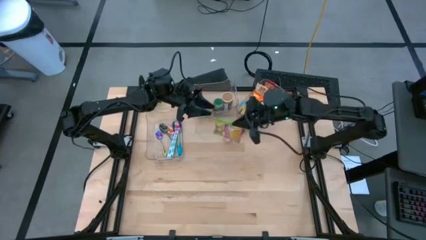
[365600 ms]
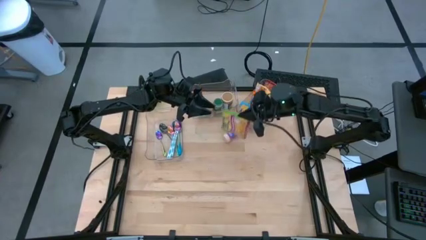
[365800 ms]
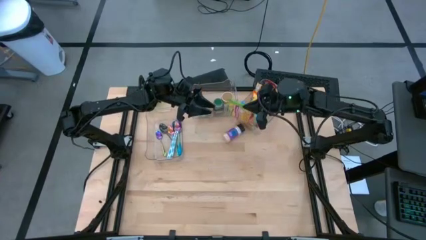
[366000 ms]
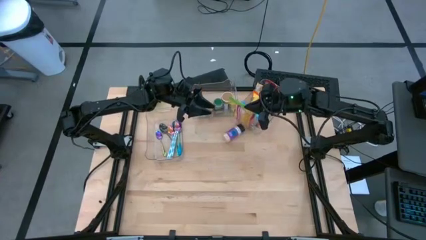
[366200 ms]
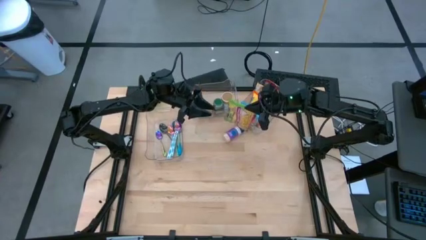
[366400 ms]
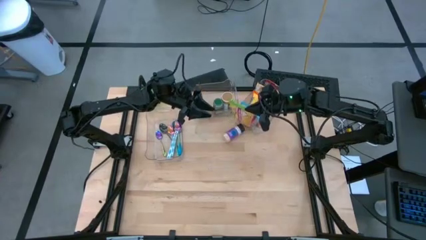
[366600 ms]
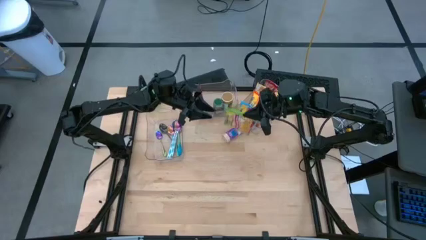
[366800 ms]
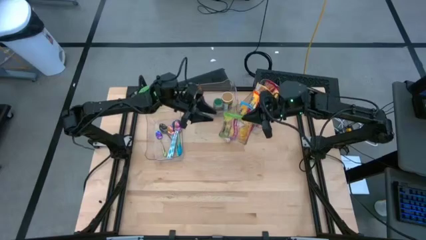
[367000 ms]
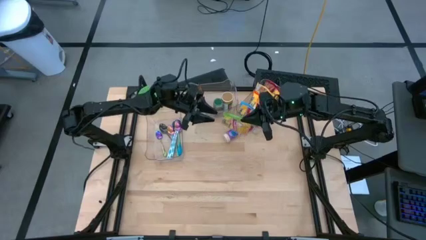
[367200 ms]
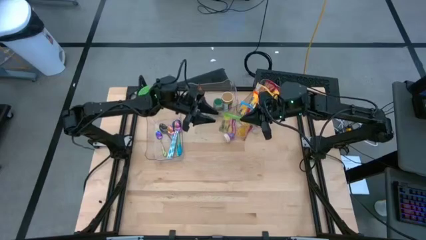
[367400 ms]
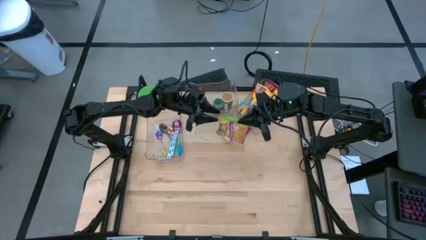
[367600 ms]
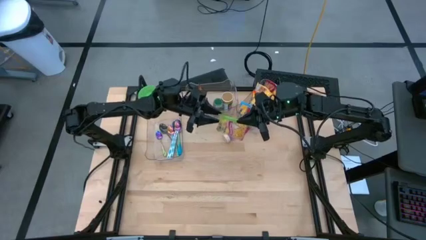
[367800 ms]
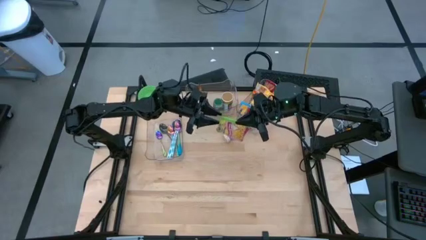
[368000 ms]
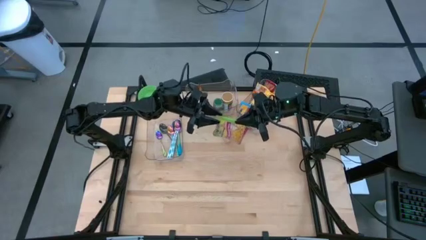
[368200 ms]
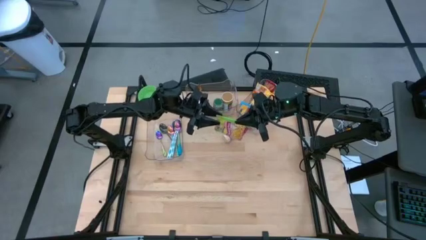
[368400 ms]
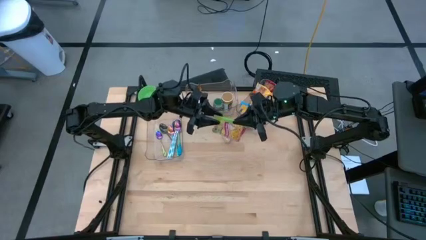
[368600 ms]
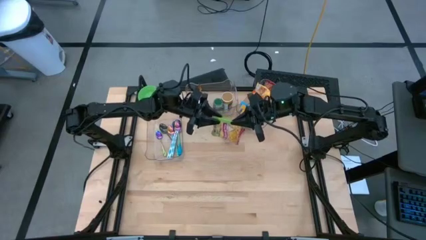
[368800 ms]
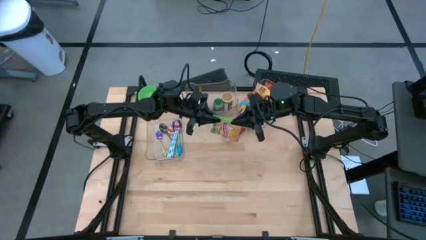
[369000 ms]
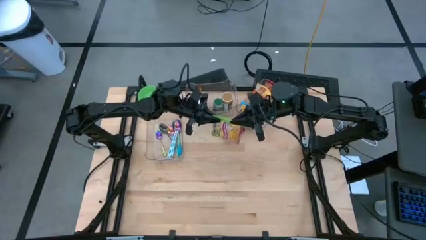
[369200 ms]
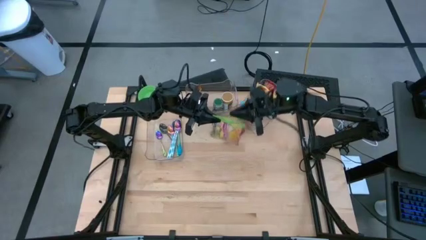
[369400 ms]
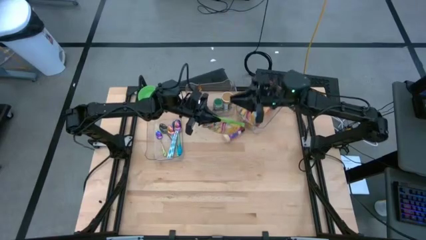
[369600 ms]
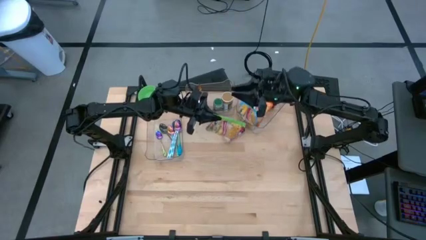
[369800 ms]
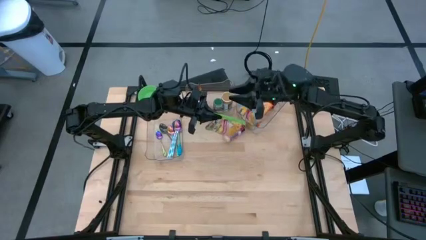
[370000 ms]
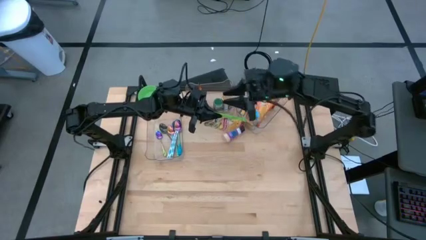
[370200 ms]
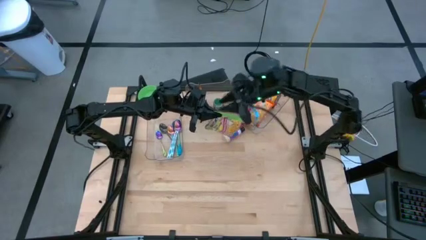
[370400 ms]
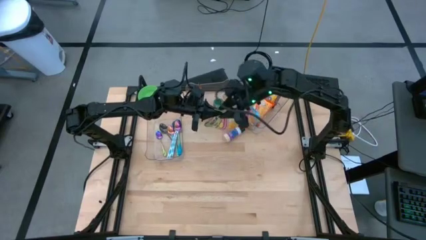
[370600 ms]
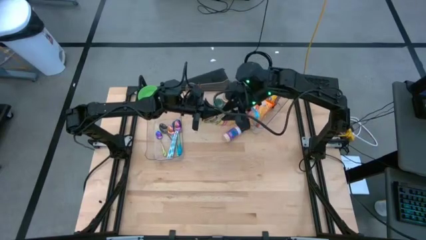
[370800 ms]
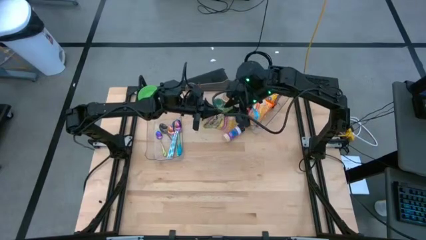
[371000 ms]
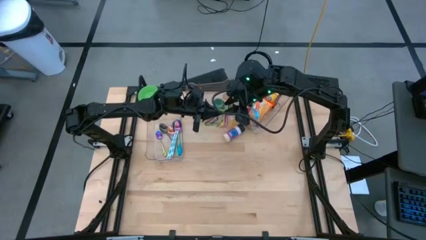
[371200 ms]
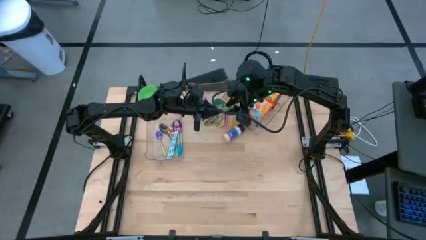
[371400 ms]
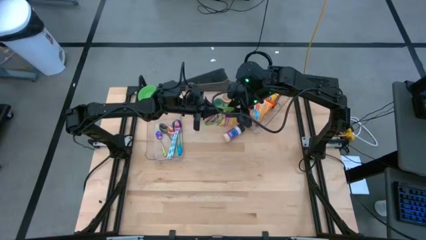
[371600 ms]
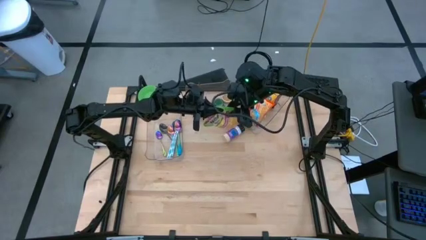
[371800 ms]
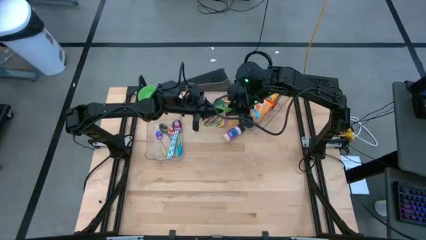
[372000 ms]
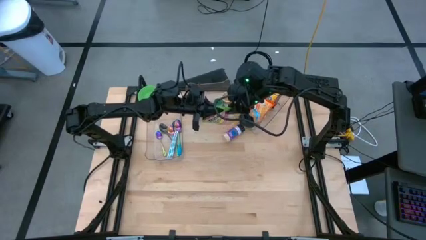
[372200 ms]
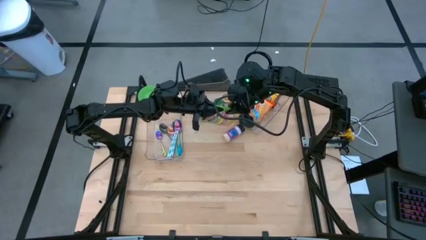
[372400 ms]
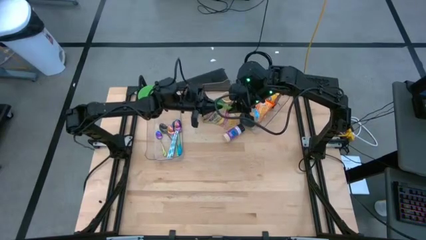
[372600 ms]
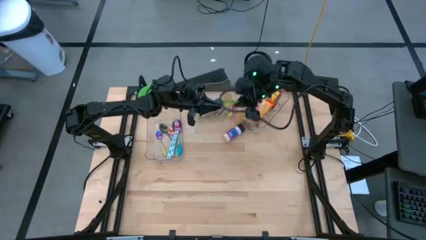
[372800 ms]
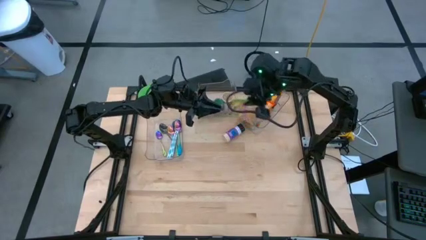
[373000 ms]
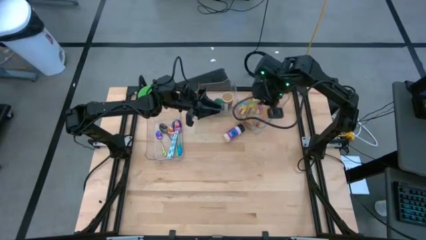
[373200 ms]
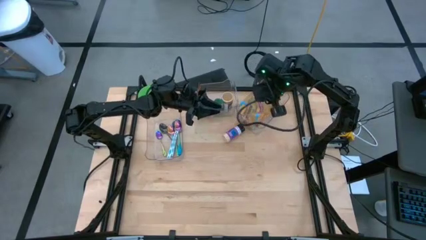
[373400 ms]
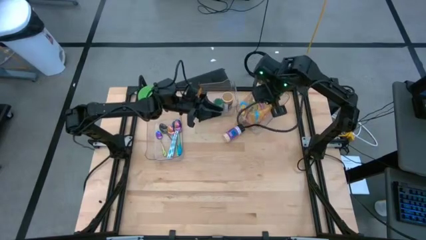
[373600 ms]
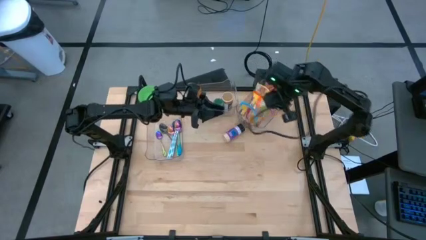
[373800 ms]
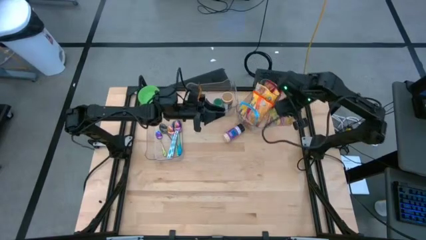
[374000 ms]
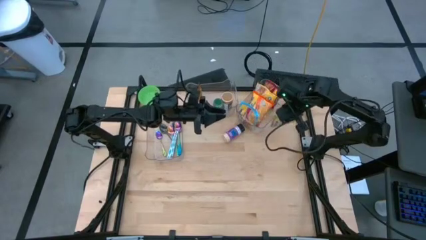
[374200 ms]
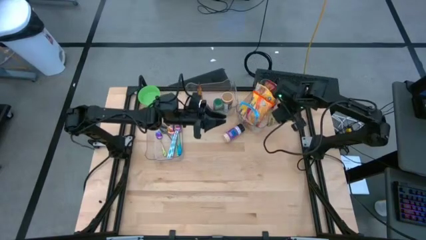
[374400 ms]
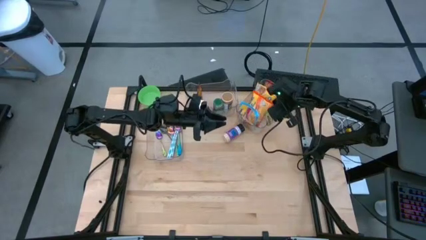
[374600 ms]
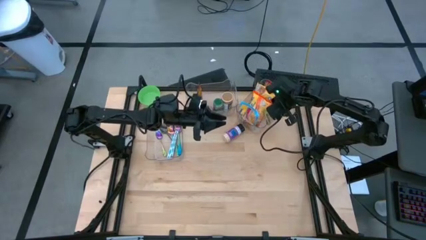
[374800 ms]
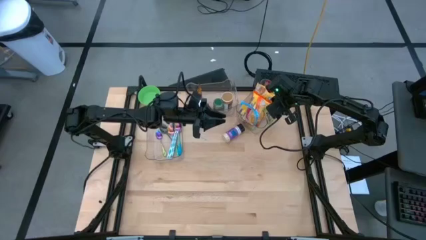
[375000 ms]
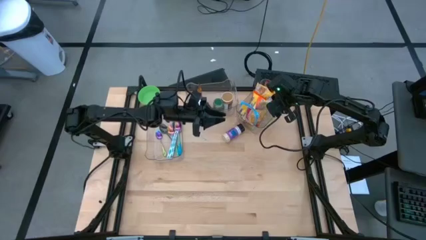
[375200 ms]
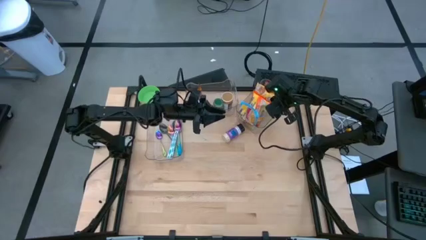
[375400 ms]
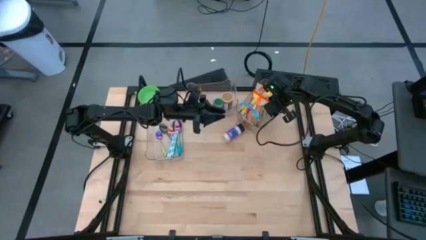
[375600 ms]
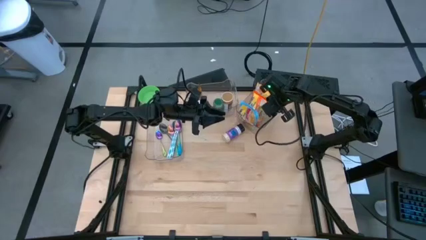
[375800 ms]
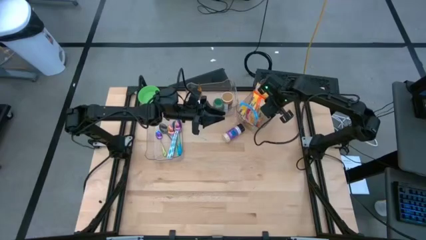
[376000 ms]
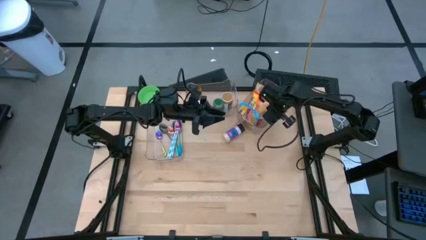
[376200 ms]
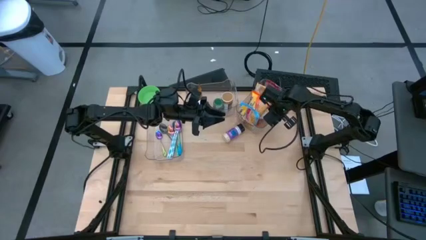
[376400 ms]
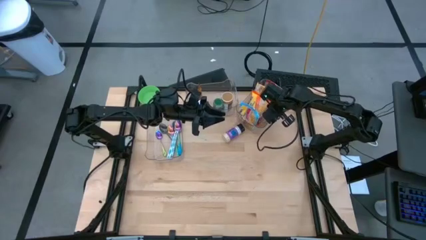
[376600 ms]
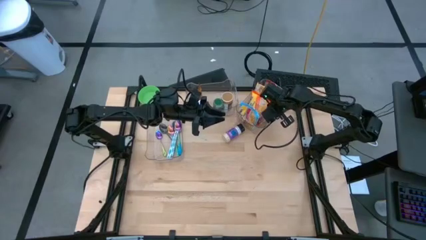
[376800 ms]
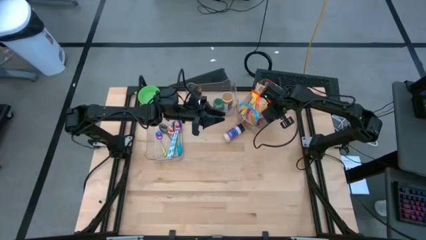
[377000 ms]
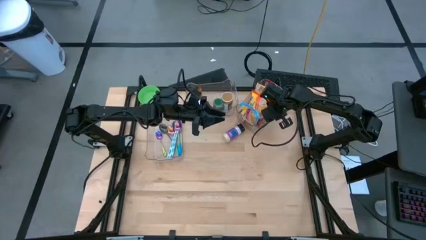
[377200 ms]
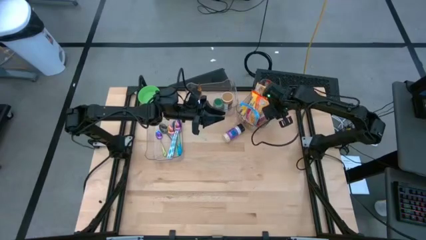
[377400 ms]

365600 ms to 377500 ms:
Task: Pick & Place Food Item
Put the green noodle pack into the right transparent bin

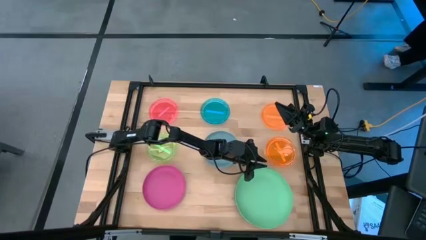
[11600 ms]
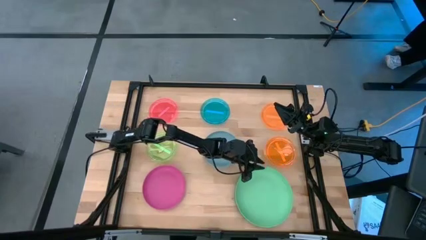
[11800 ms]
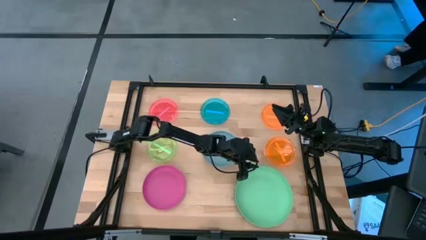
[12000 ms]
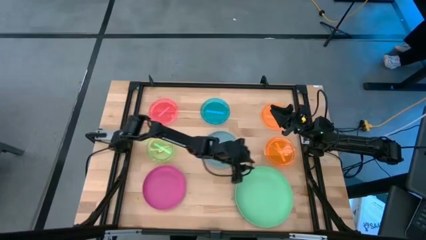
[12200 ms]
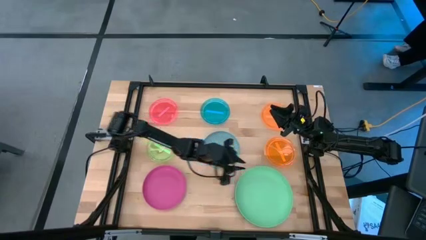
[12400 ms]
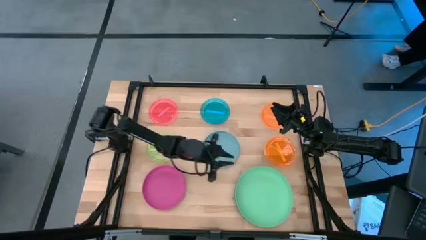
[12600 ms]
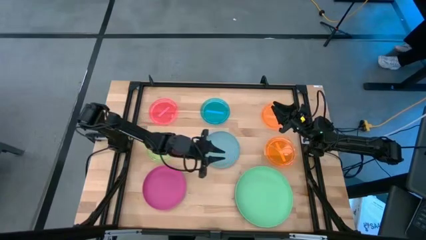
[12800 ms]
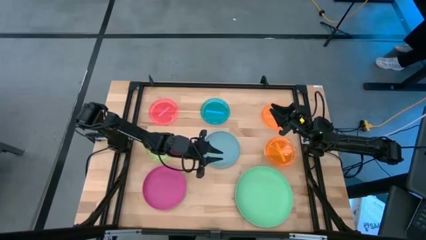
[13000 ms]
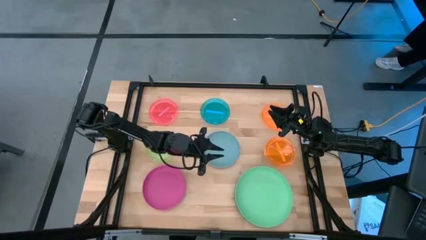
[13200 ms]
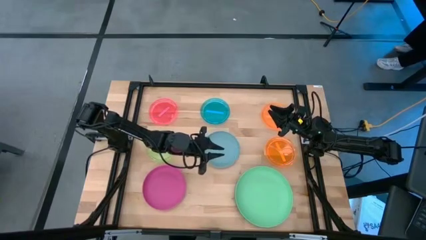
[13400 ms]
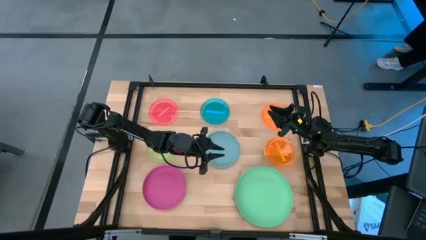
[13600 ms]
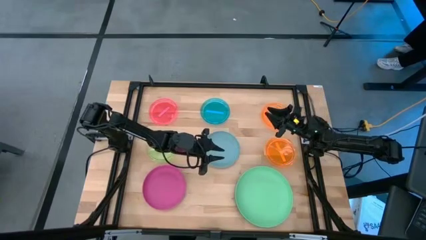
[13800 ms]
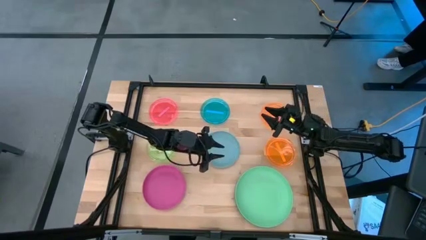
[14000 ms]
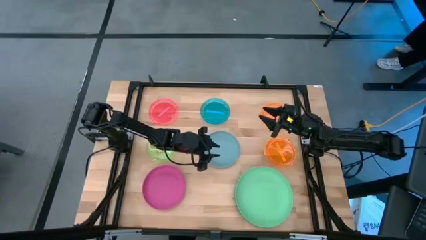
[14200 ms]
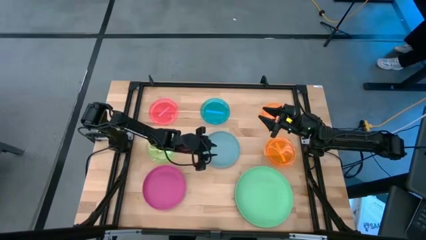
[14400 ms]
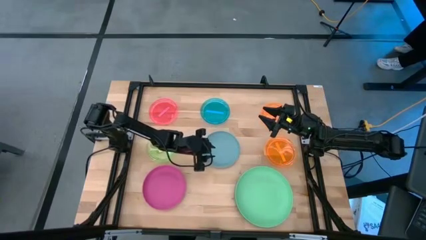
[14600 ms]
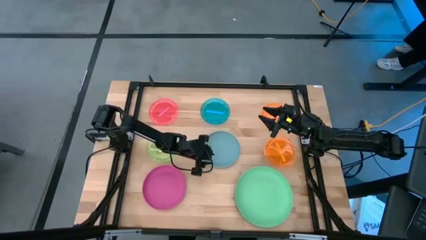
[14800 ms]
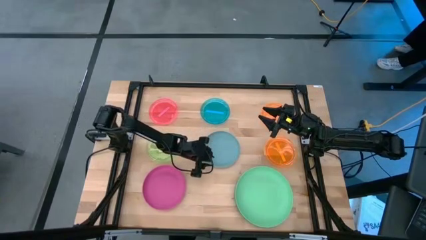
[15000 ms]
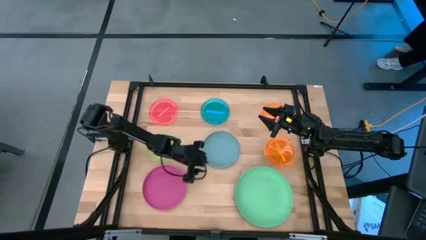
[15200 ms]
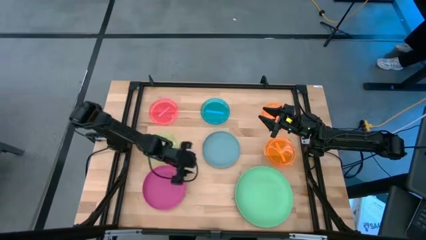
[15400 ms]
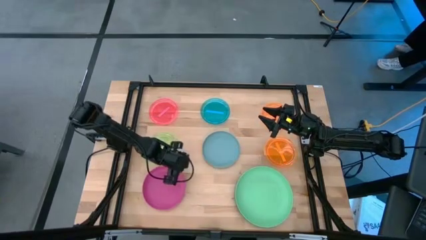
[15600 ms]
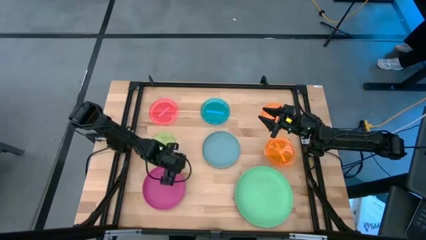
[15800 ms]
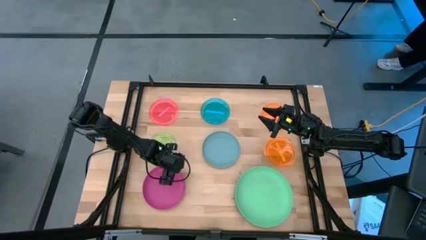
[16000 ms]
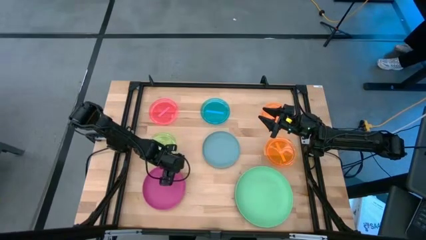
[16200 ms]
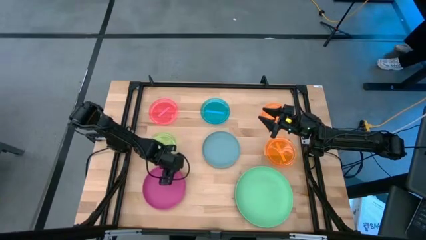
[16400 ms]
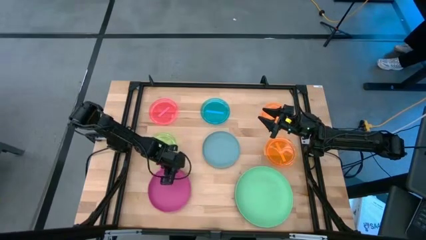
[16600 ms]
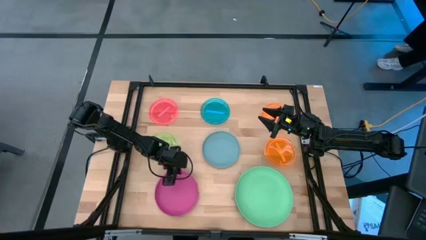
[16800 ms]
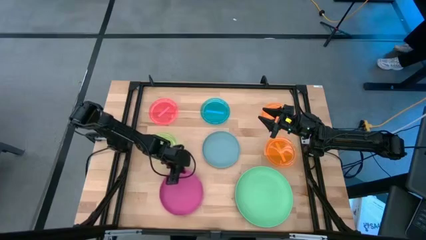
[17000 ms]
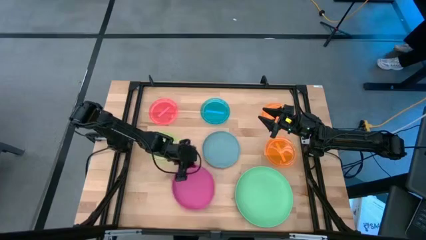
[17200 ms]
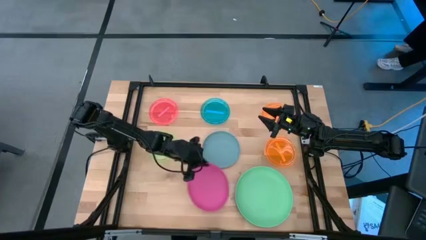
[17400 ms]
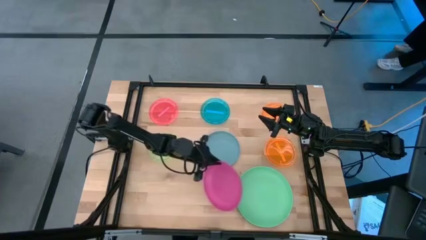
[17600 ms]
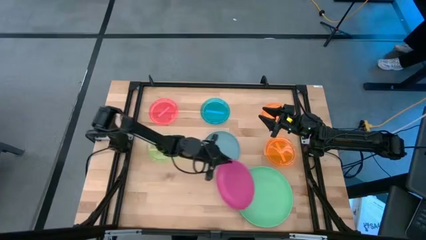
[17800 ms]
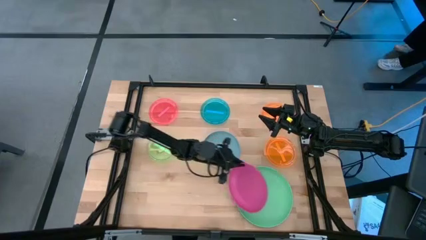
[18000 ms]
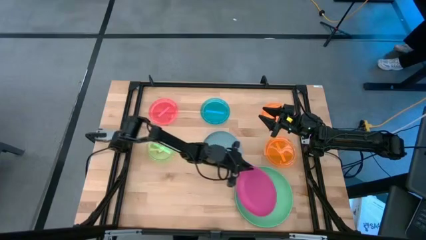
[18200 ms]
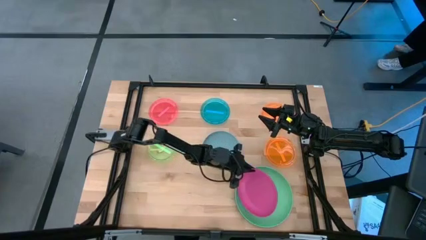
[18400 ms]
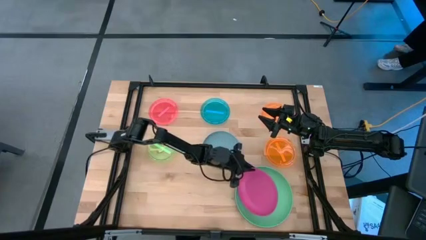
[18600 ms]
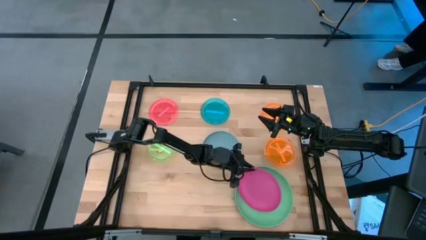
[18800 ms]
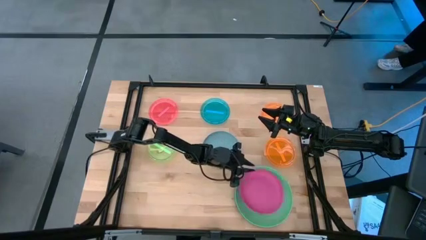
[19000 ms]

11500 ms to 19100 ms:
Task: Stack plastic plates
Stack the pink plate on top of the light green plate
